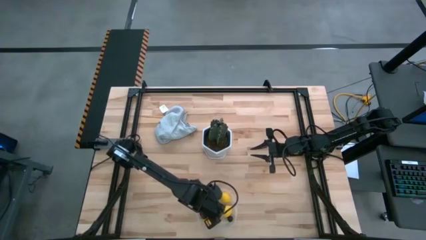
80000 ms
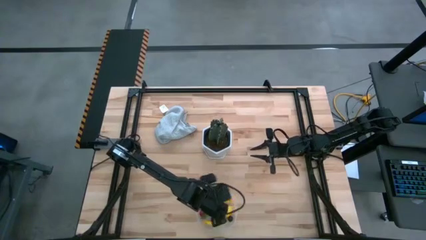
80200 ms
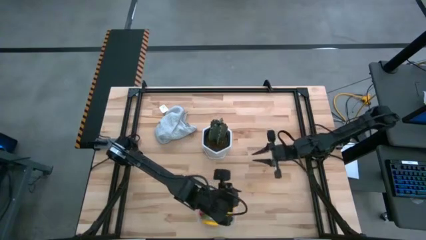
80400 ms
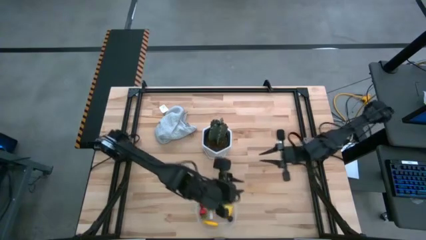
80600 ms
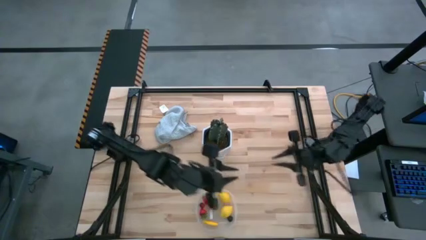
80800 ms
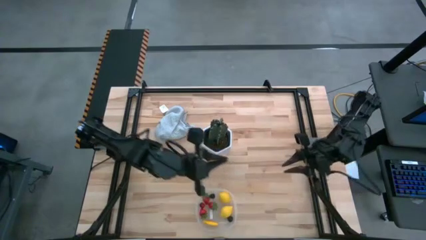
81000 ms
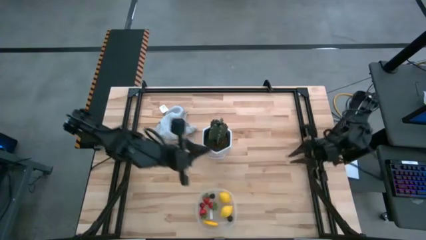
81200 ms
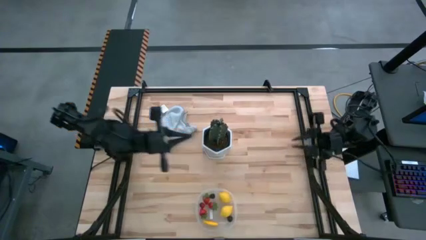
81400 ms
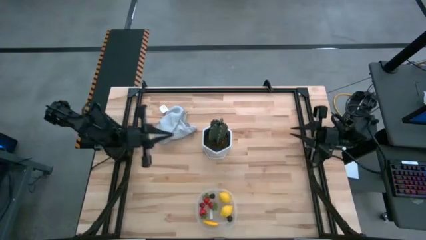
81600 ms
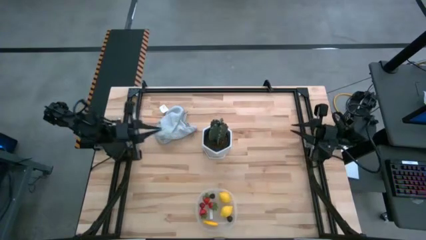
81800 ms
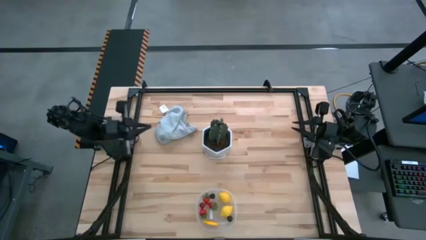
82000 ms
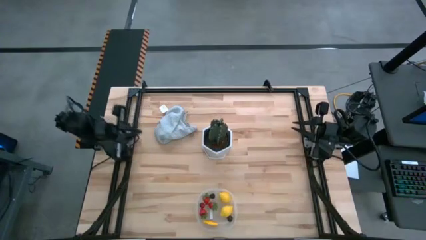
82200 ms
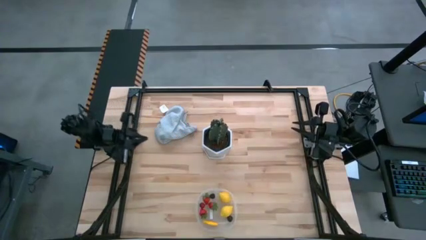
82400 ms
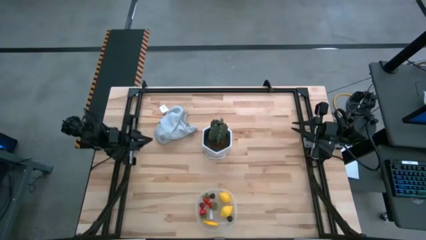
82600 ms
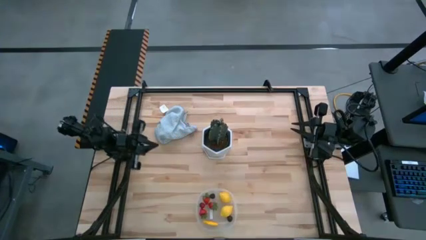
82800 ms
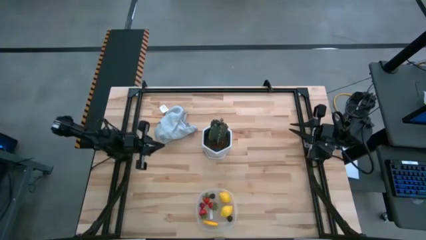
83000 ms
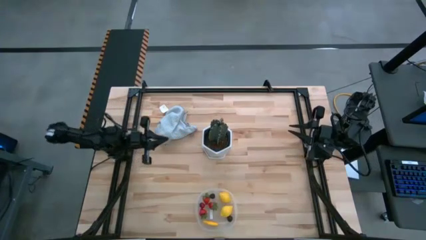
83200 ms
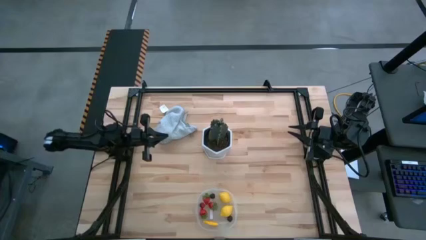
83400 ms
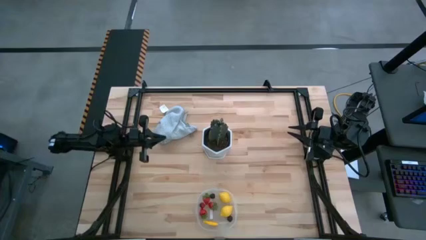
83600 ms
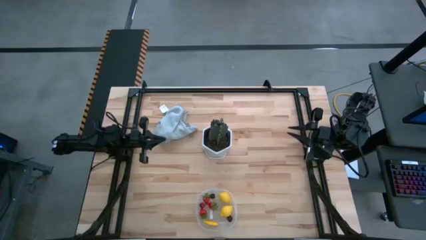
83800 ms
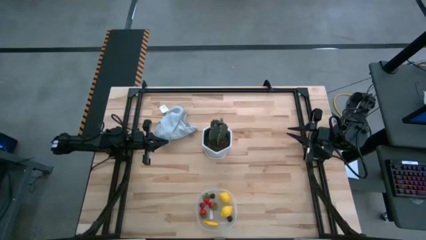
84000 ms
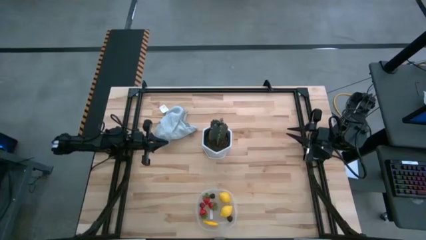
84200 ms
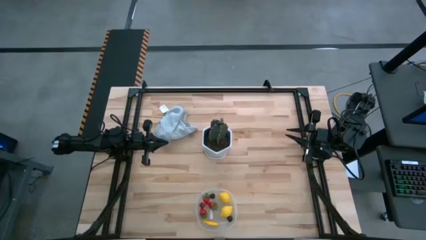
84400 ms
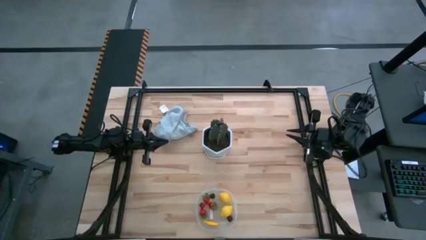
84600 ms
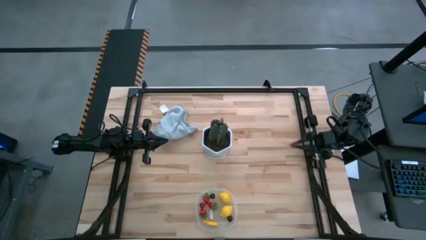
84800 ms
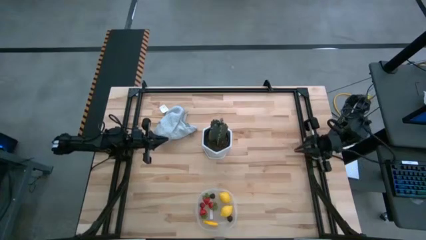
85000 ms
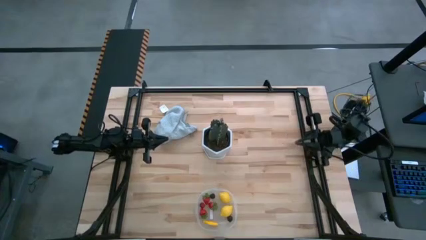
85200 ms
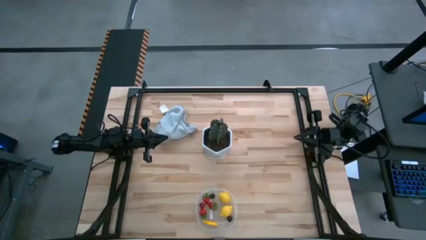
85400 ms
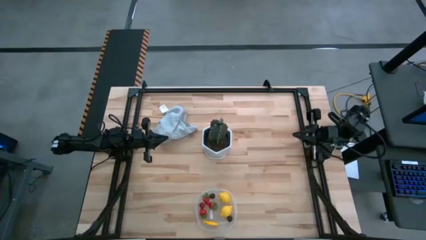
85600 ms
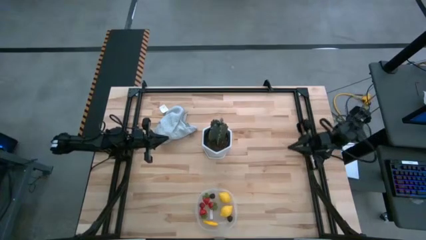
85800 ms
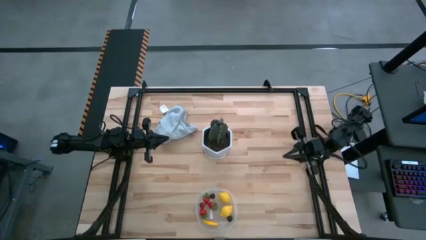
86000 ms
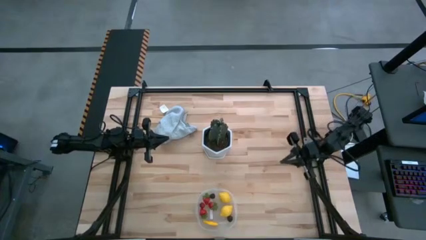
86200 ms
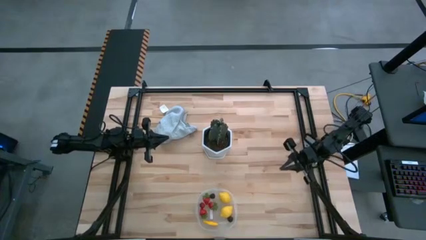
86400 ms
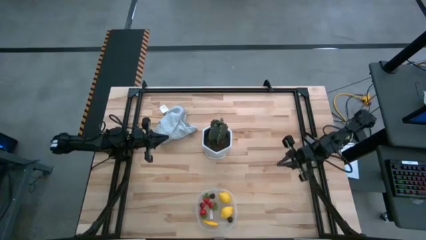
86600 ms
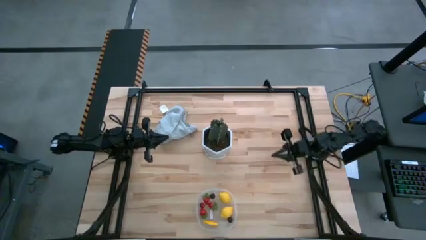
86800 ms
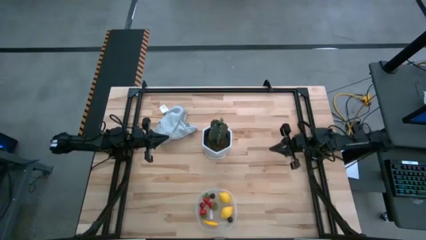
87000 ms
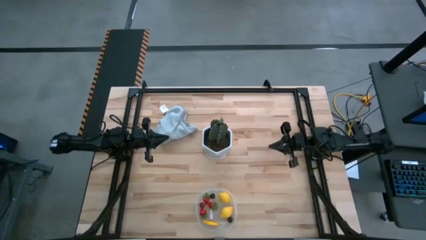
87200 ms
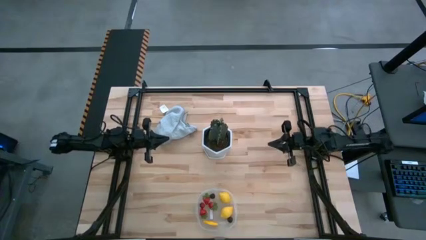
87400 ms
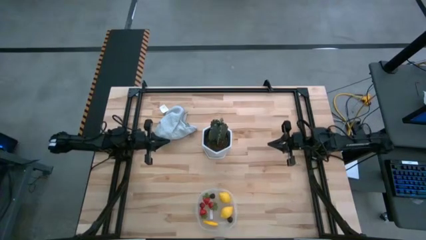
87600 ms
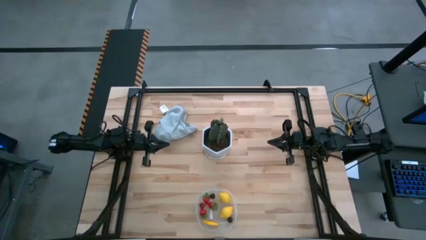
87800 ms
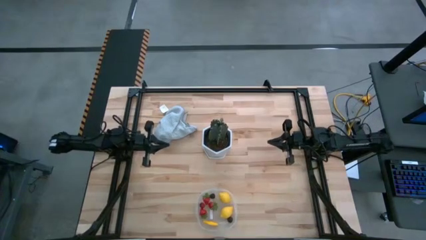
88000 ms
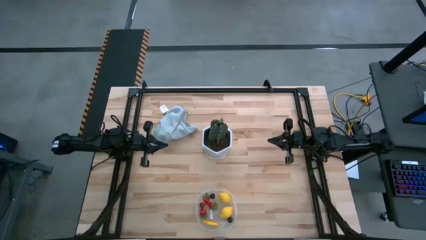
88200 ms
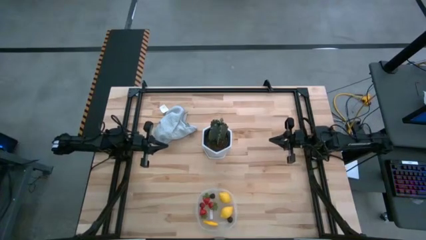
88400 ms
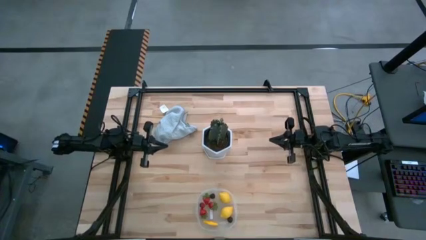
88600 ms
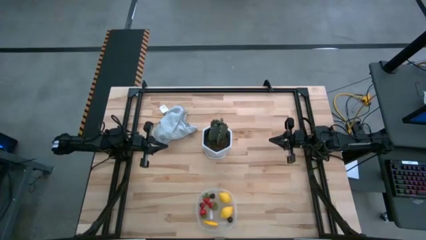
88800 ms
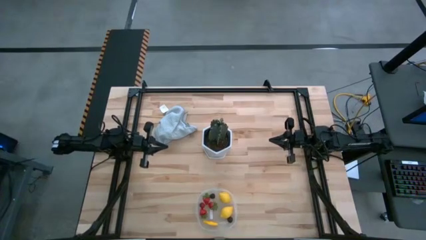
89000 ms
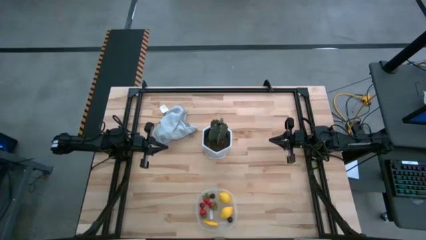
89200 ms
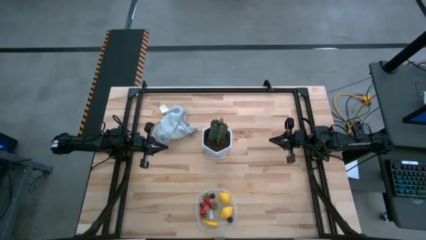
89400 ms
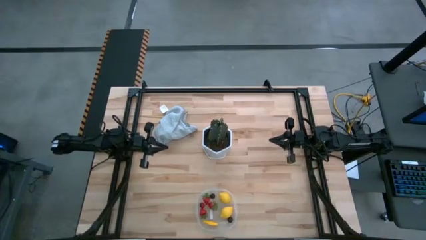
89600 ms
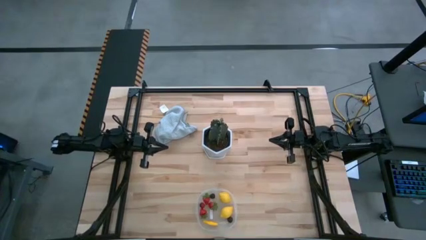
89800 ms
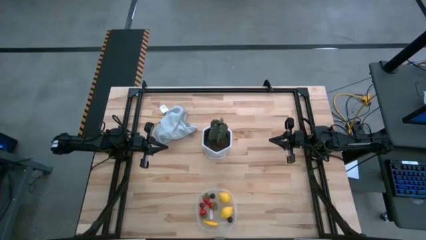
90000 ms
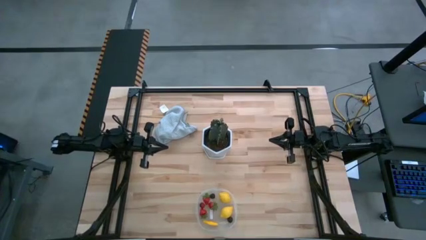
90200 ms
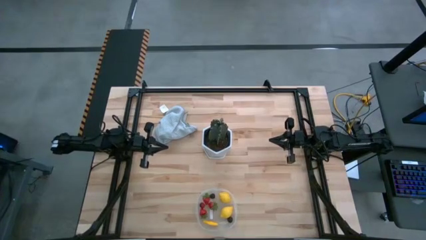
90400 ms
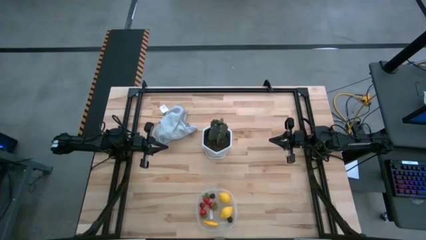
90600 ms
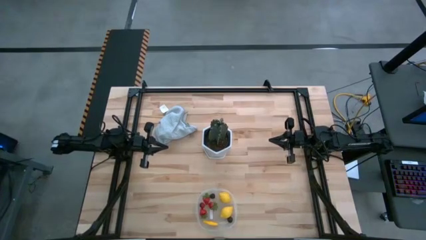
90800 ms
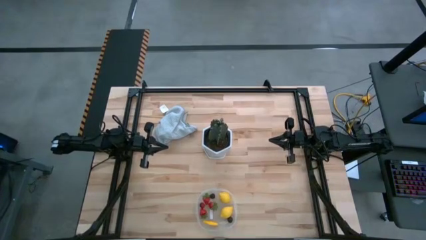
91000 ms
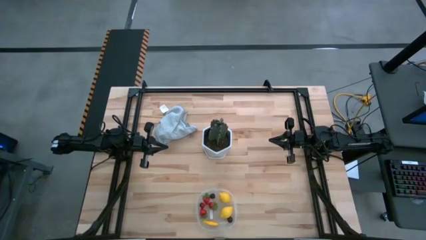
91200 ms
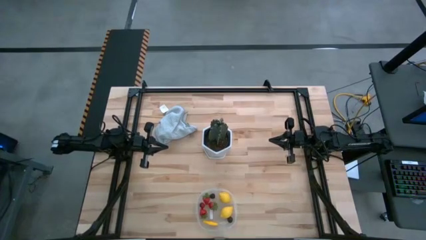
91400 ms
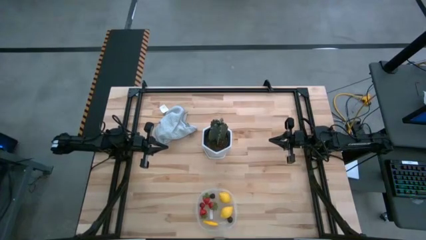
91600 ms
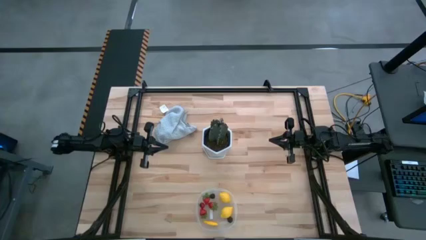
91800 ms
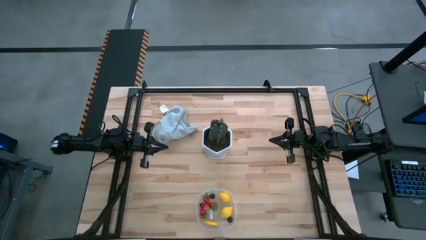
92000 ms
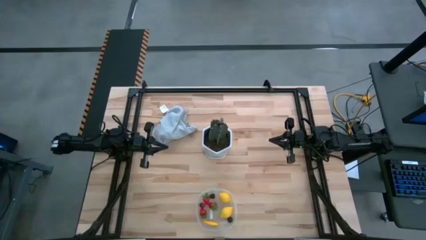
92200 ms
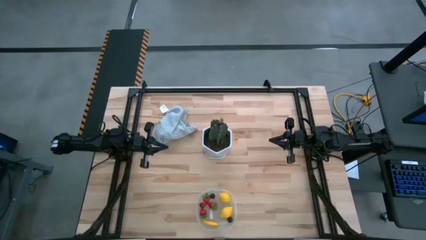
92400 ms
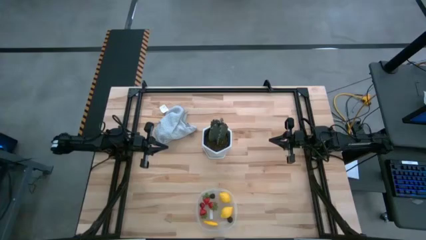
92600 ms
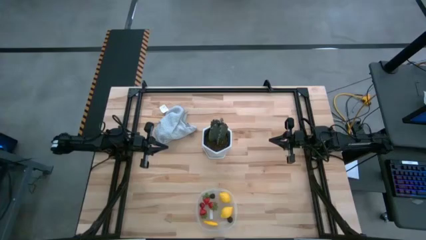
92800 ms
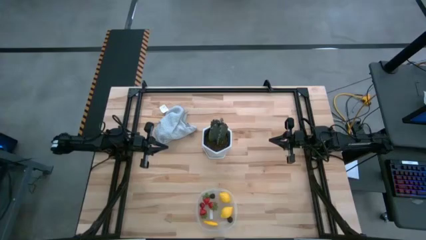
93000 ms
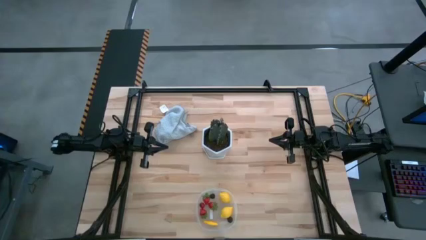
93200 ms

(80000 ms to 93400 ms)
Task: Pick and placing Produce into tupperware
Return to Home Position

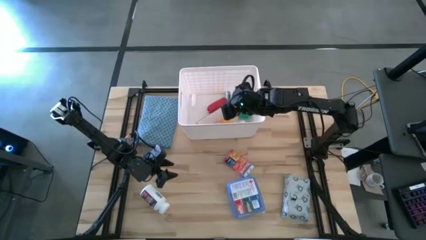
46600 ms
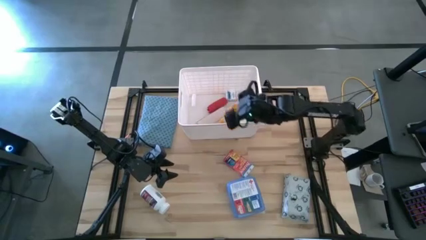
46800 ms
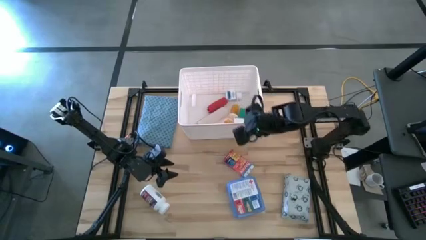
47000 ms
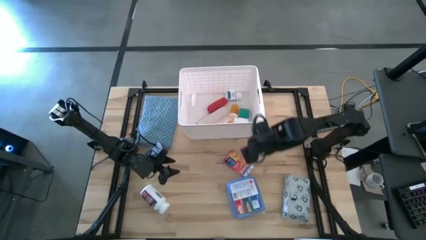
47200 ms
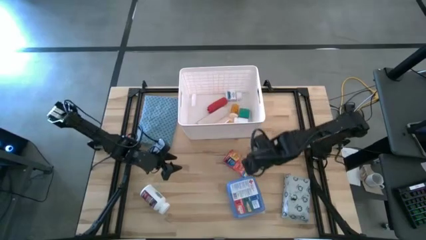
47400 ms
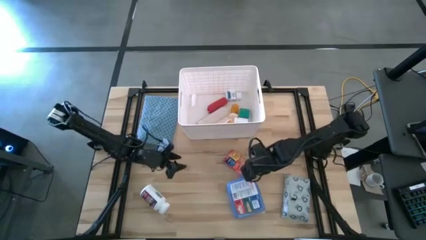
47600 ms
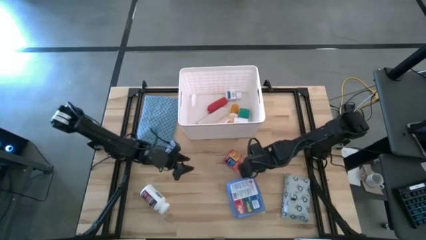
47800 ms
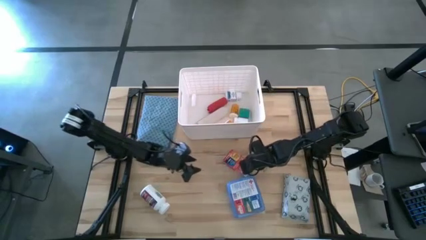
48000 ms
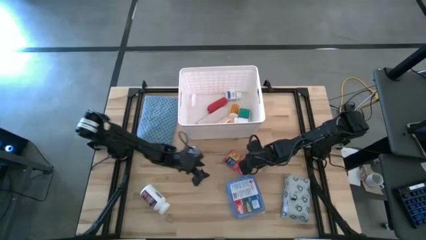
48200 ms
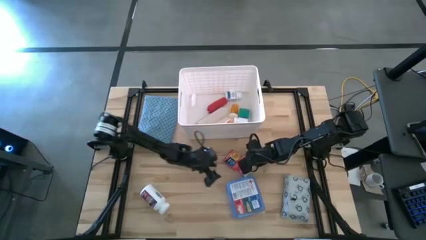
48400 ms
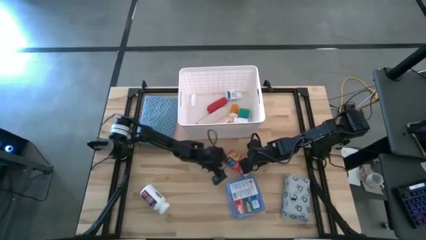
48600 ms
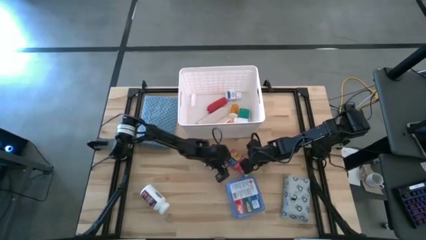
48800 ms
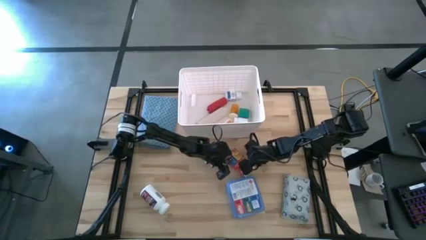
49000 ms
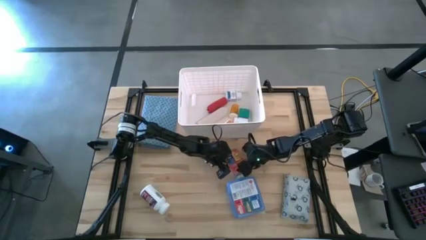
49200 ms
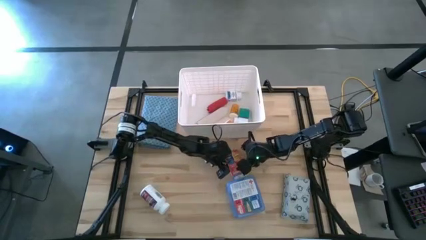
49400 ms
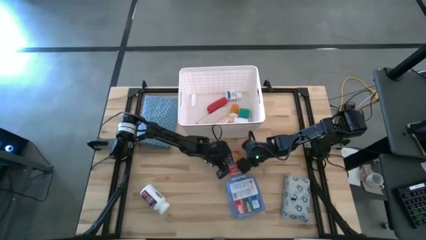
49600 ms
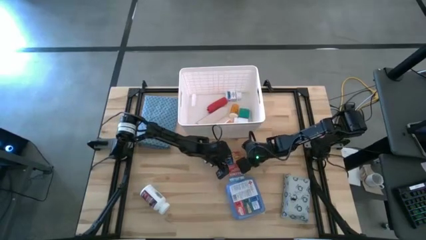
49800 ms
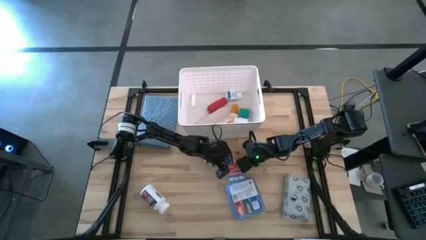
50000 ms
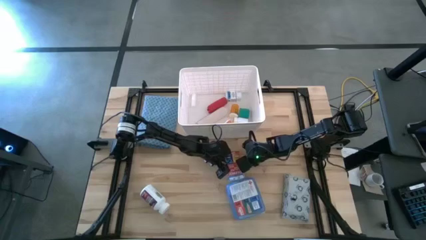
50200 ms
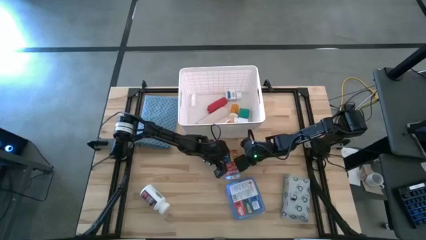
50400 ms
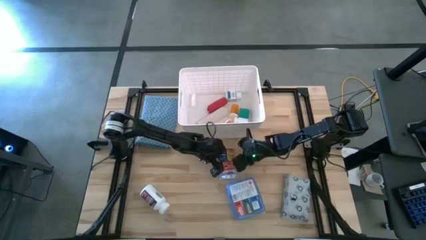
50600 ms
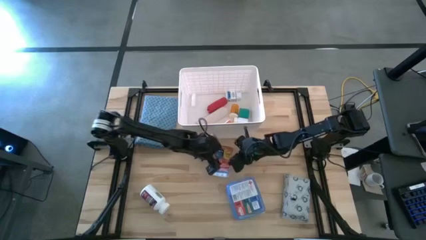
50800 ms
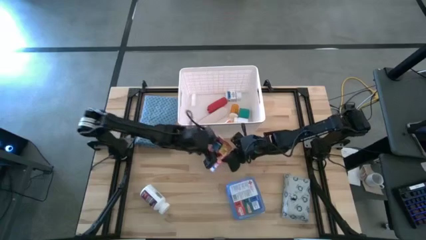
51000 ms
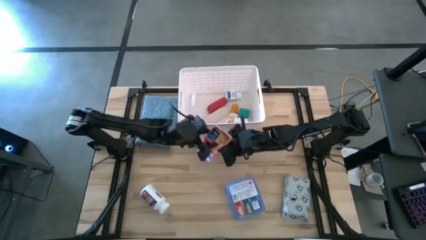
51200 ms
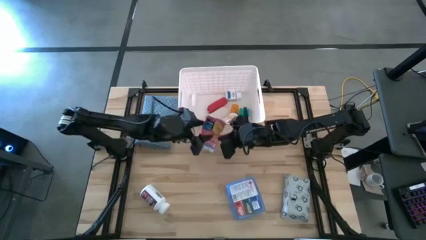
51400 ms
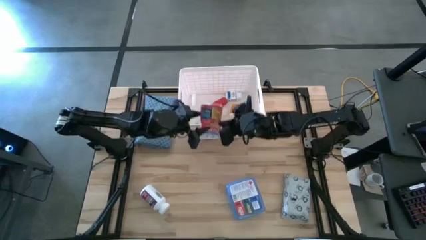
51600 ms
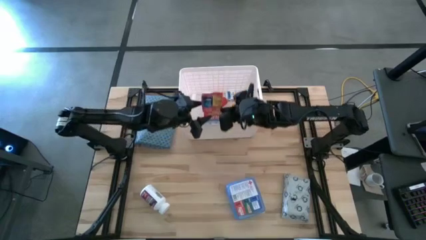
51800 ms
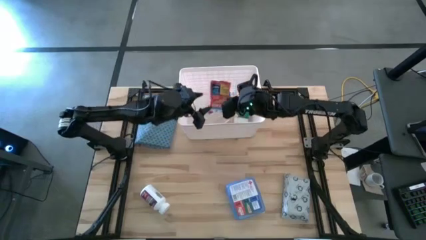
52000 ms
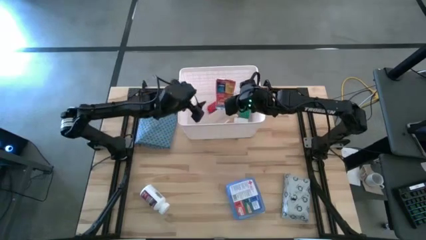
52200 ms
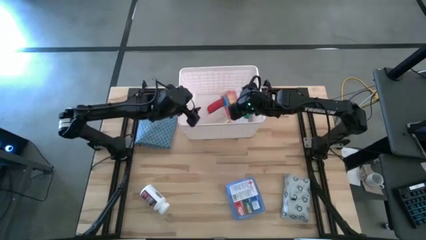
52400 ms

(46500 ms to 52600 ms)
Task: Pick & place medical supplies in basket/bin
Put the red medicine box into the white bin
